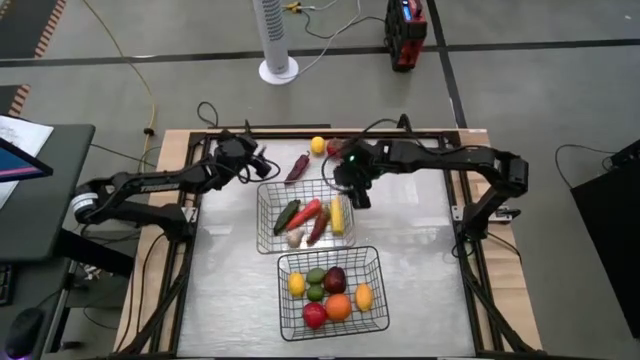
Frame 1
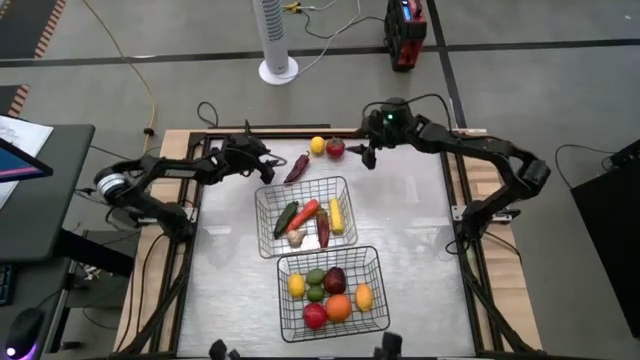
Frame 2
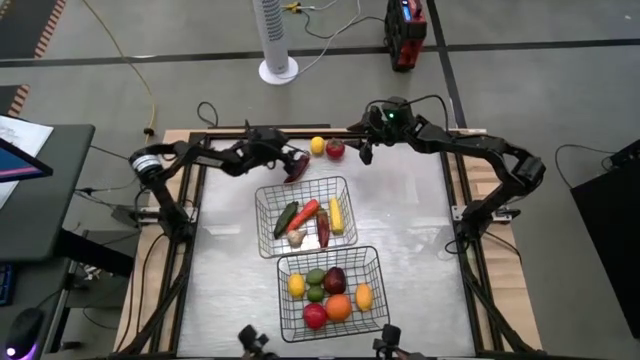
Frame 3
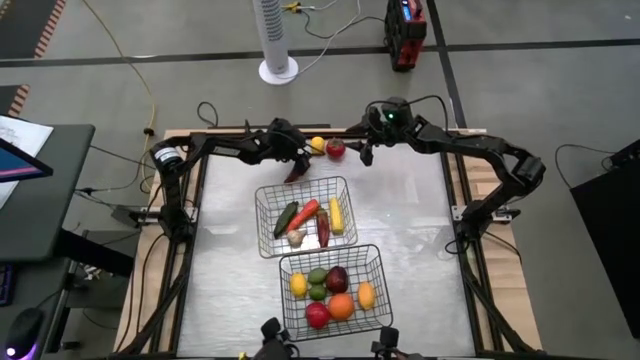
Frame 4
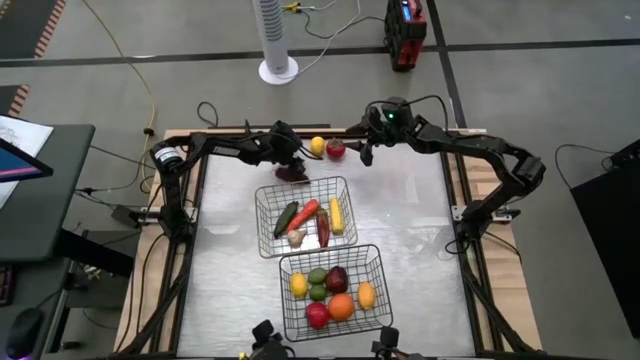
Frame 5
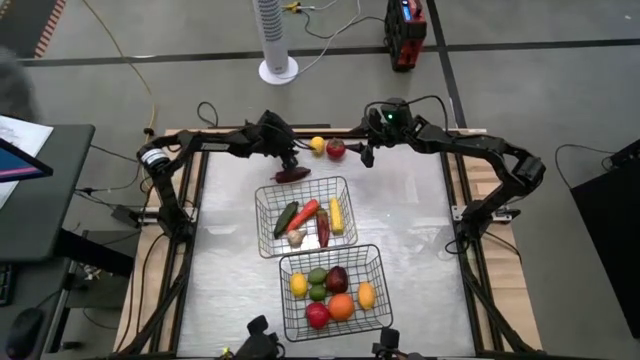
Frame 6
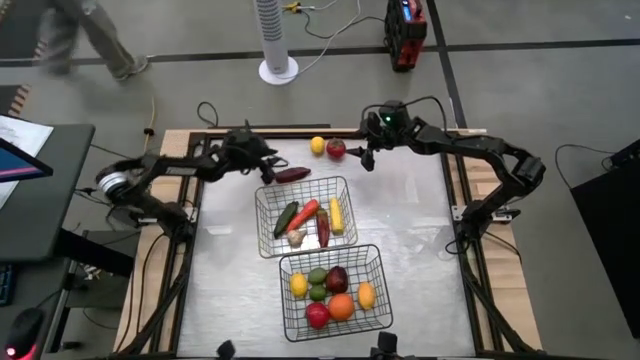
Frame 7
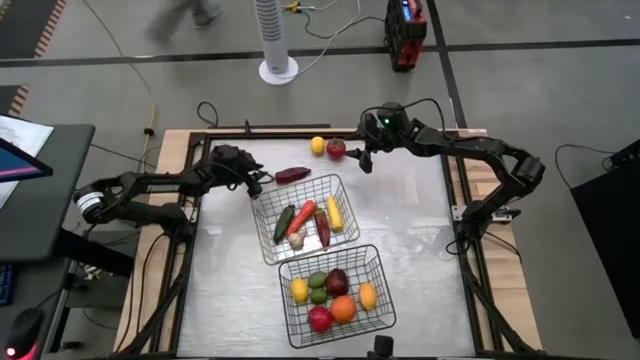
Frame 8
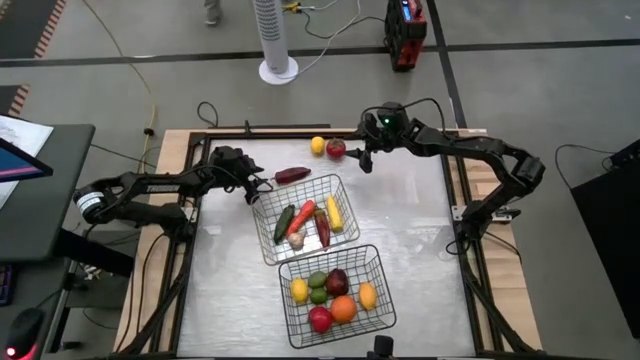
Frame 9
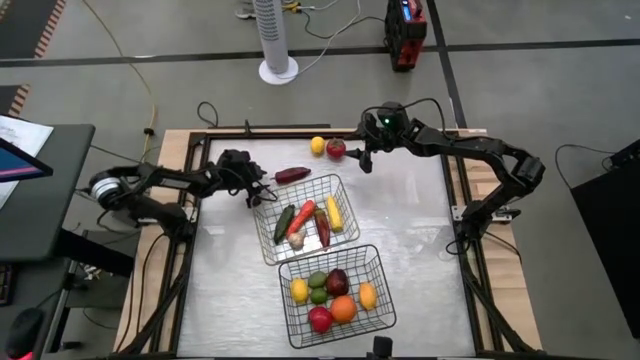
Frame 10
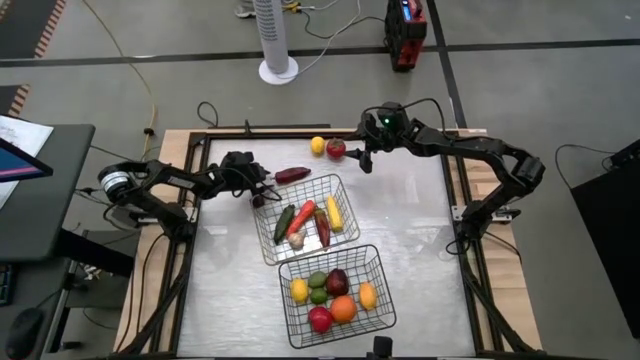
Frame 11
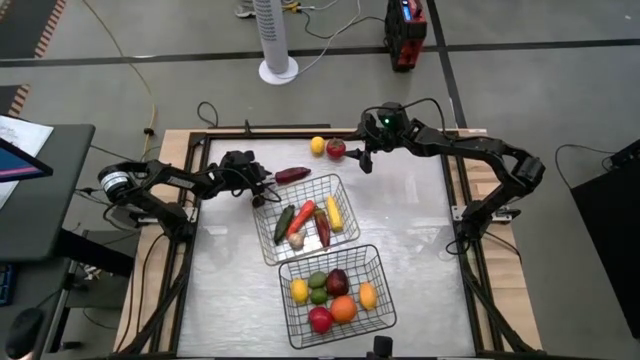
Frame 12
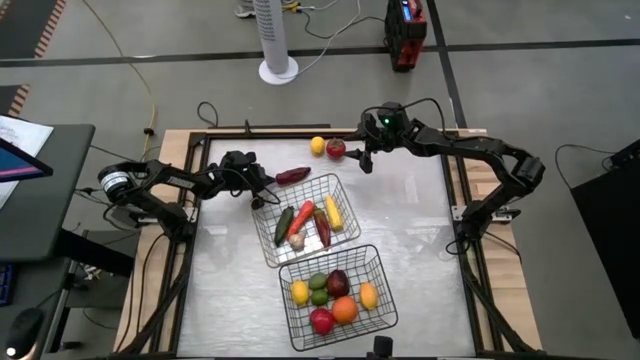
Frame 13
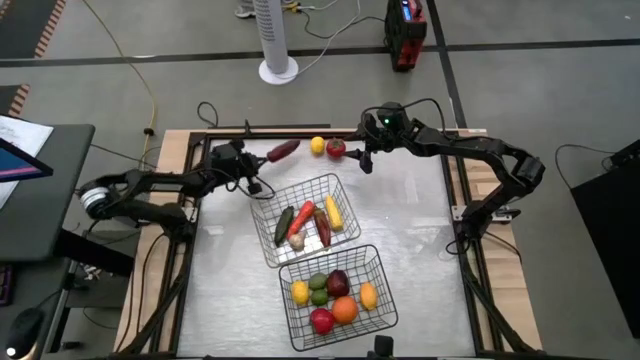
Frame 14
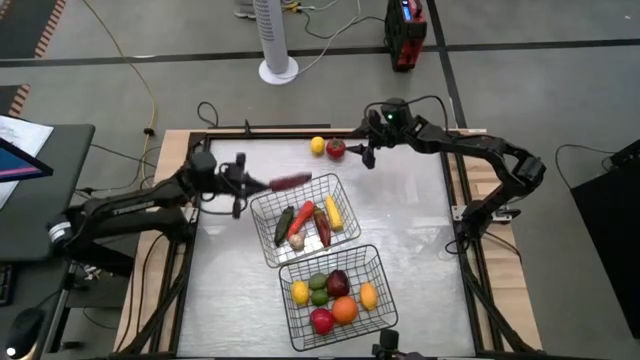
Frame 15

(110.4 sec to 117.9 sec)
Task: Sort produce into baskets
Put the red chili pepper into the top wire basket

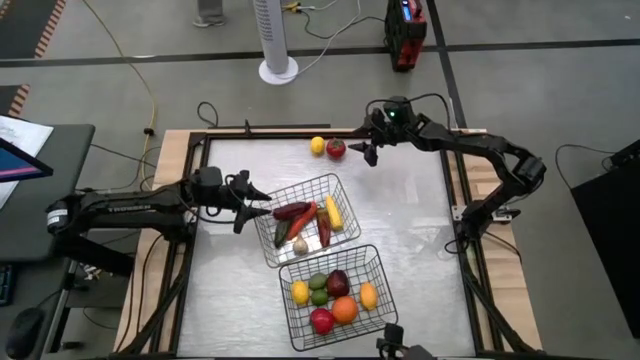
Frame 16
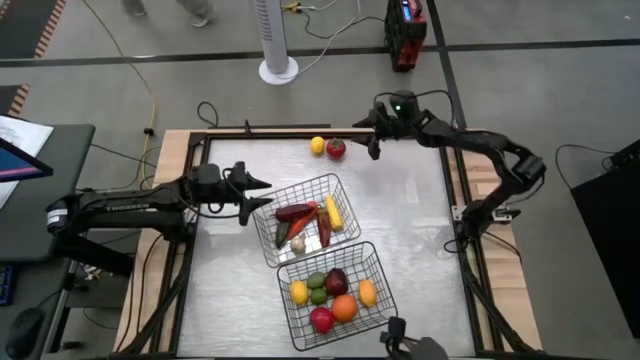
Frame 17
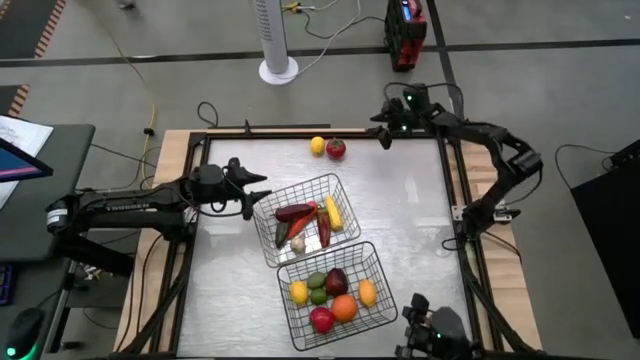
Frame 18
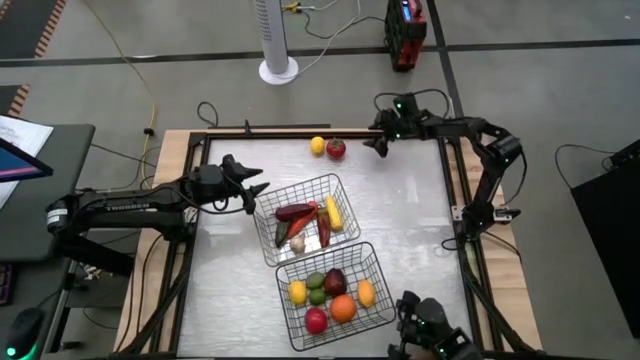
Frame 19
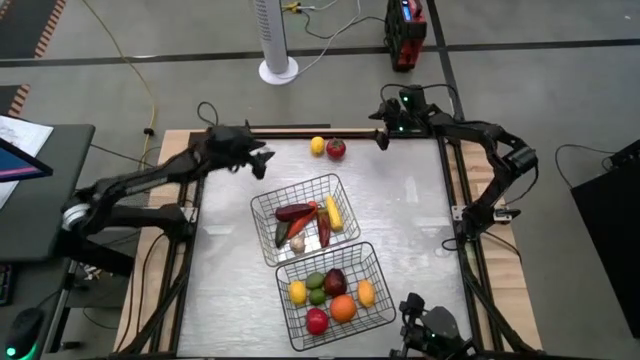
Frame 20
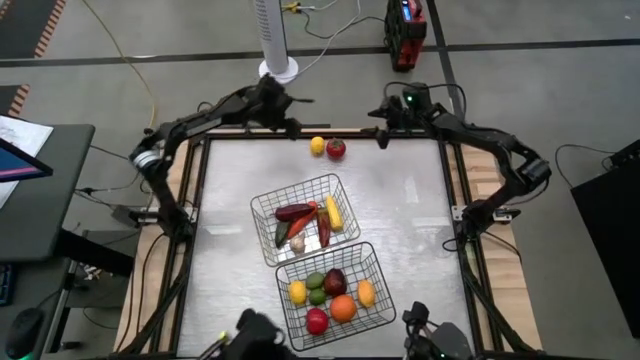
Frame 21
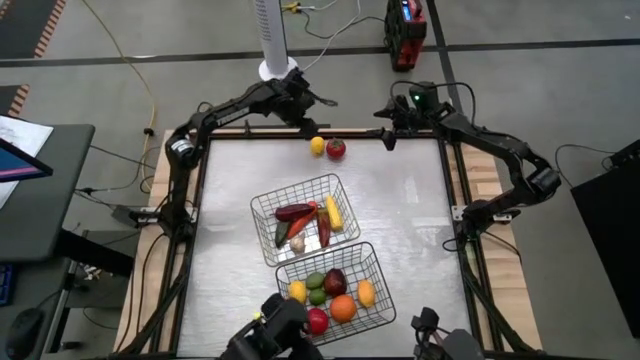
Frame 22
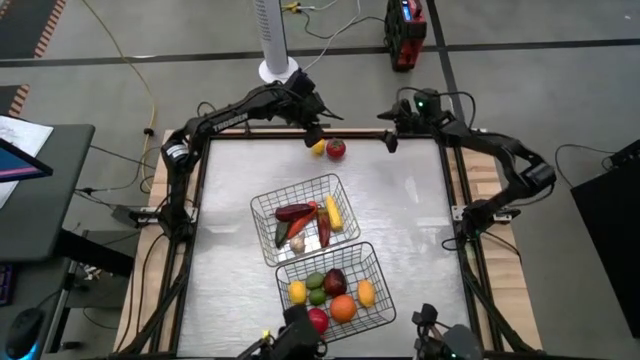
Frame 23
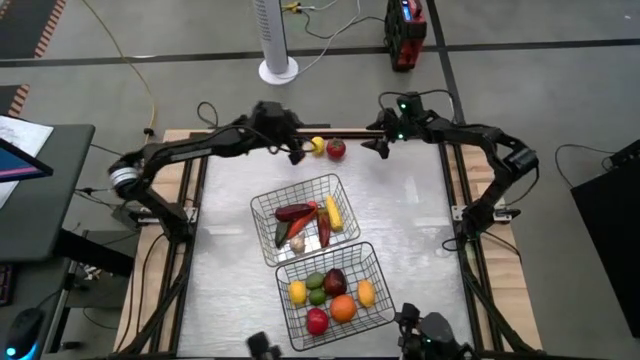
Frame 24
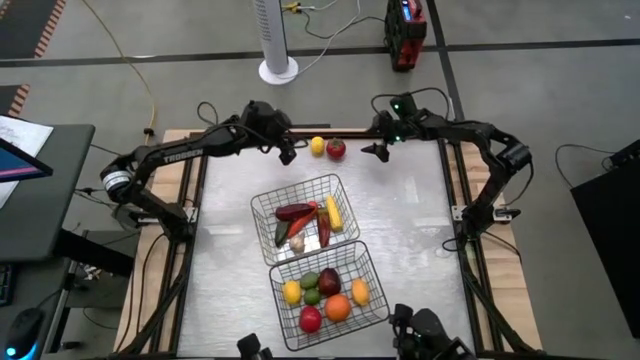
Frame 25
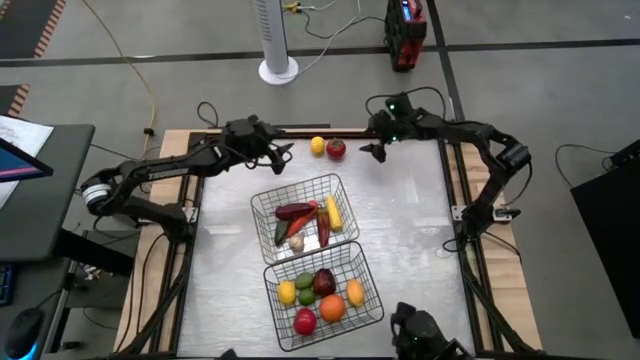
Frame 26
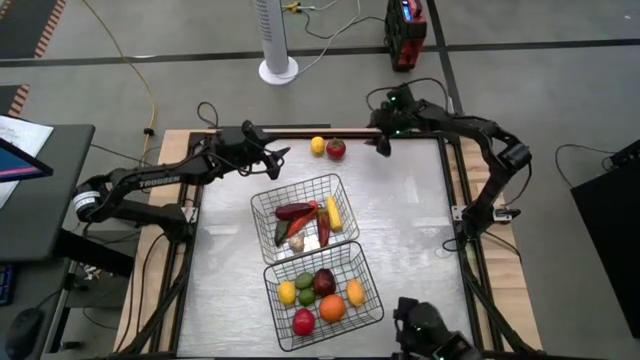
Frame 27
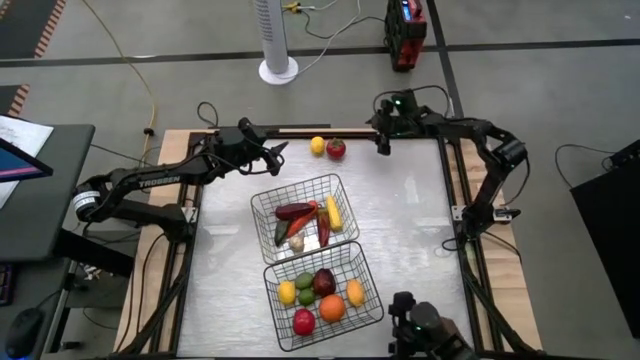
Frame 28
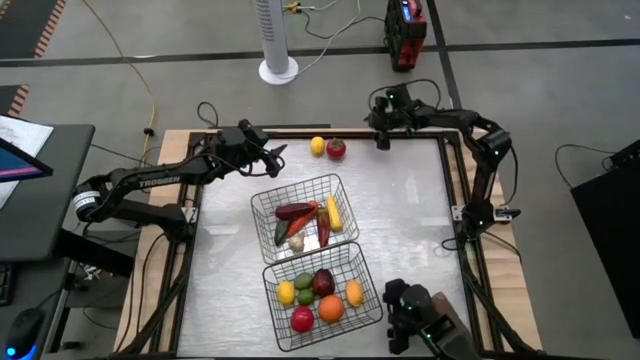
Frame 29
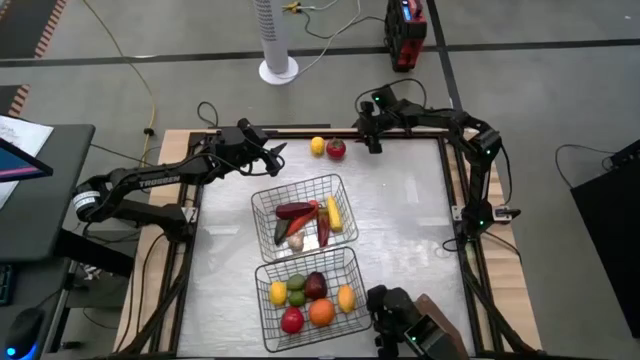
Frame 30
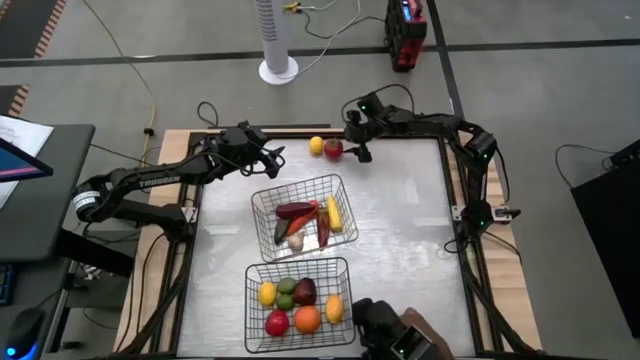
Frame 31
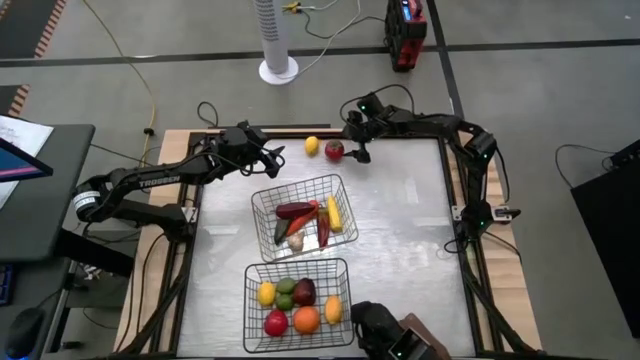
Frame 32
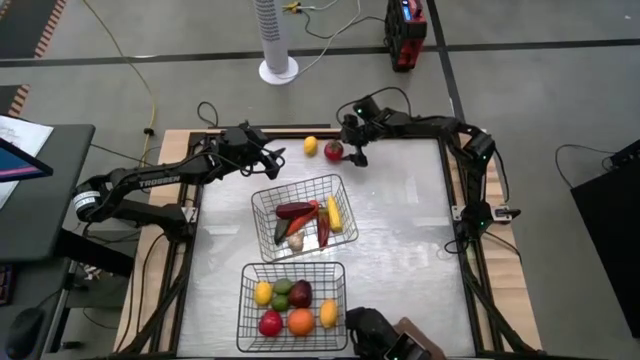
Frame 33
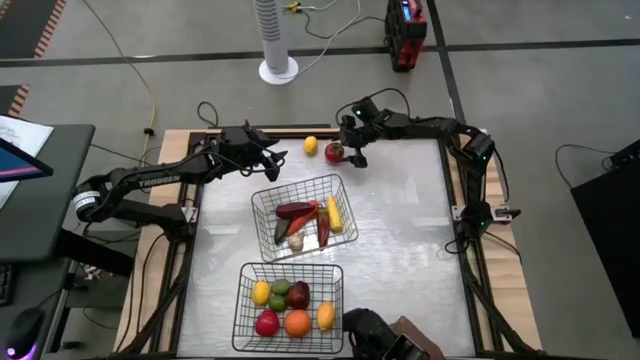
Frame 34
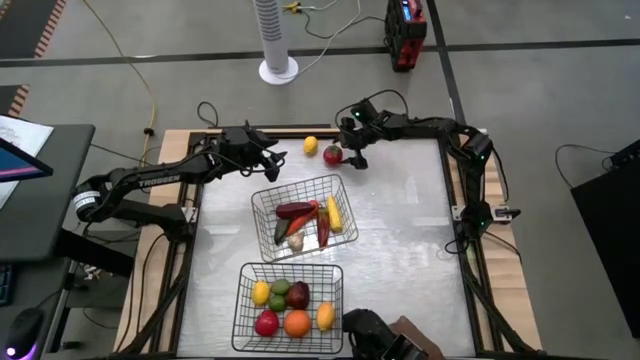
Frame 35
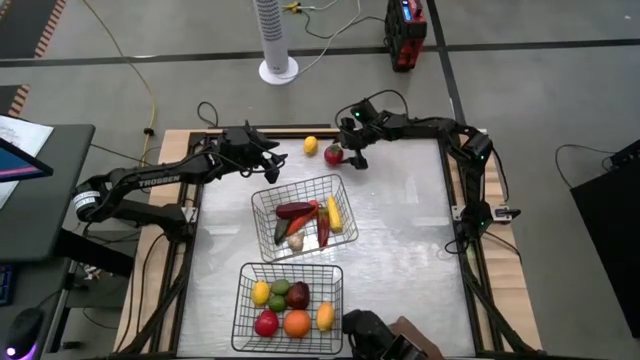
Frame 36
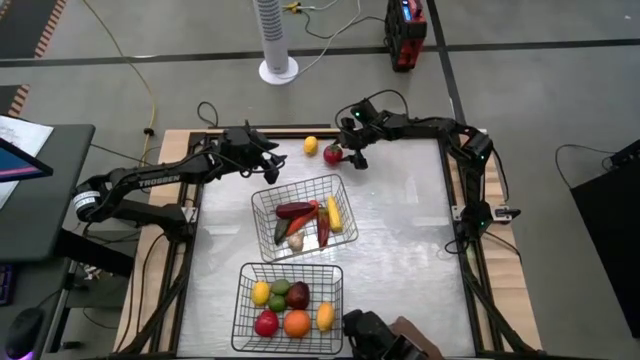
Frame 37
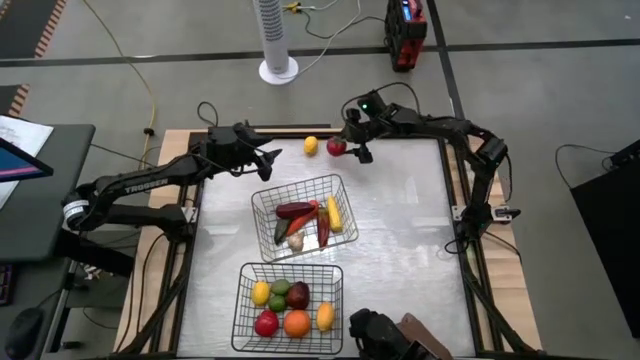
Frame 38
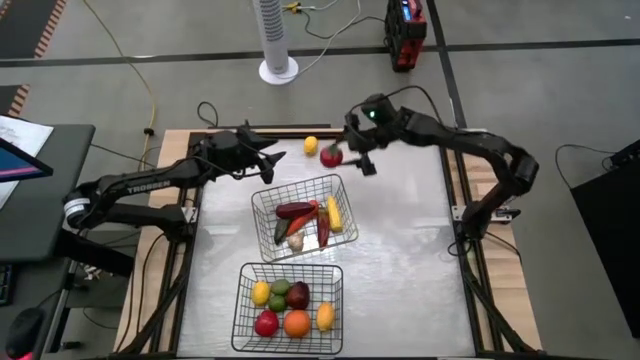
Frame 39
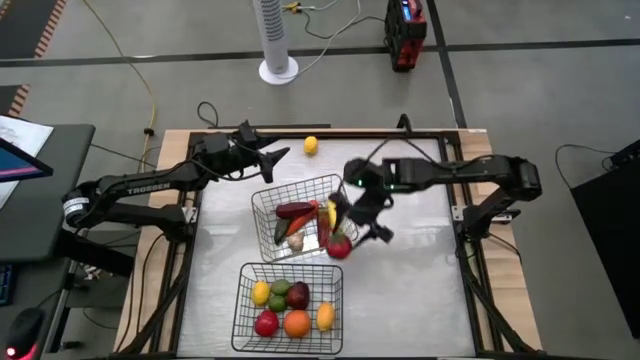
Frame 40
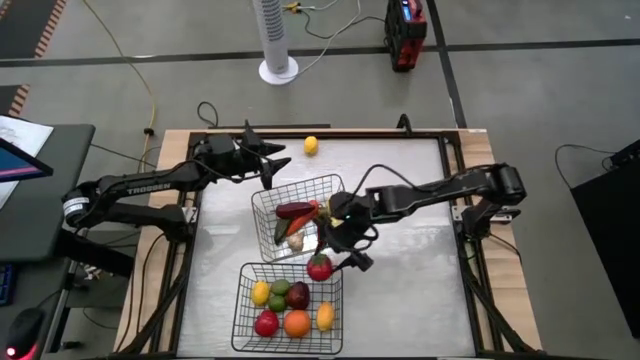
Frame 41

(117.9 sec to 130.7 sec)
Put the tomato into the bottom wire basket

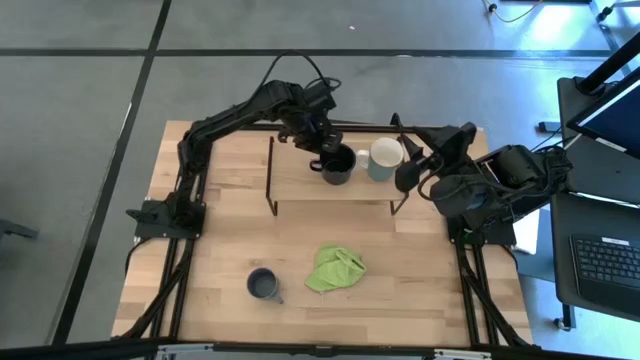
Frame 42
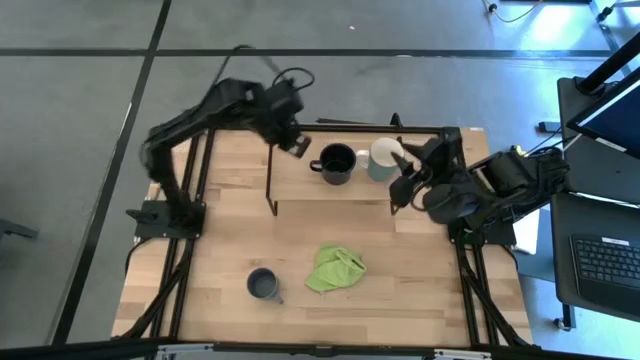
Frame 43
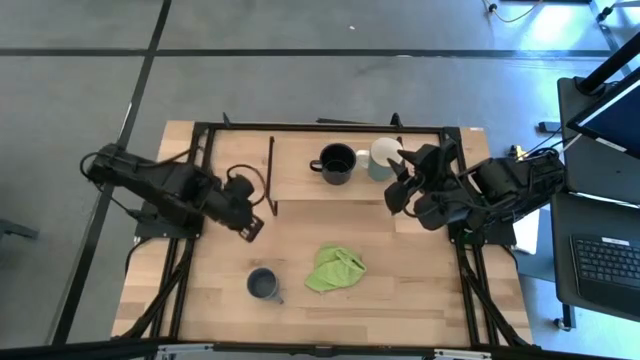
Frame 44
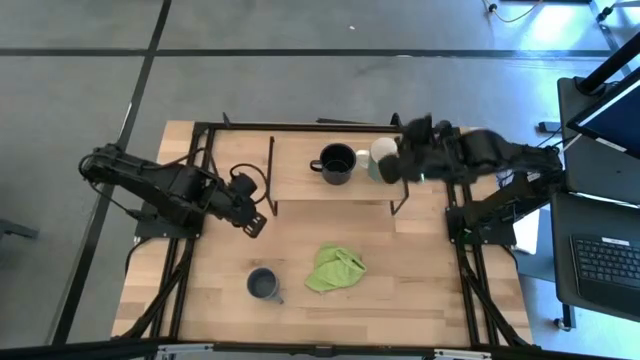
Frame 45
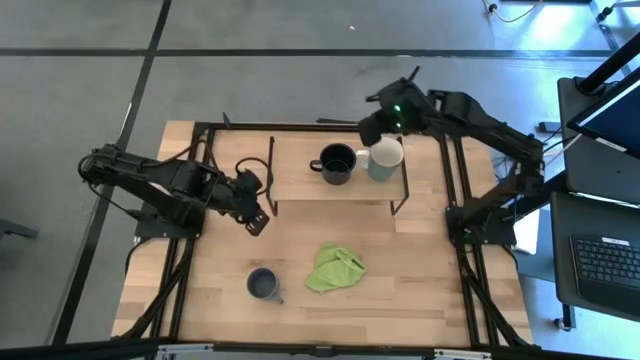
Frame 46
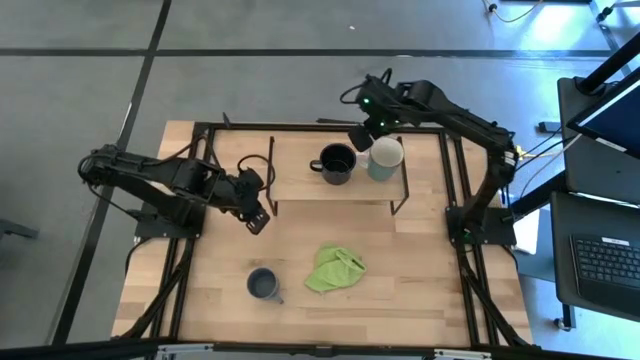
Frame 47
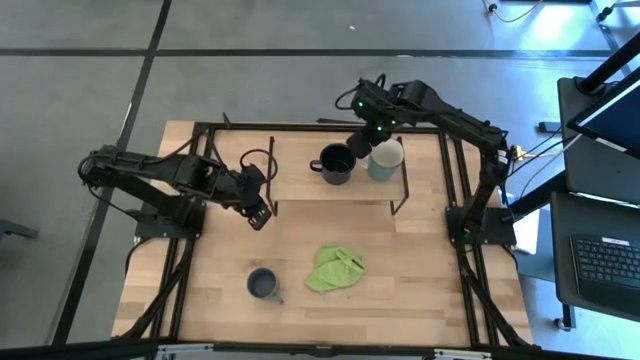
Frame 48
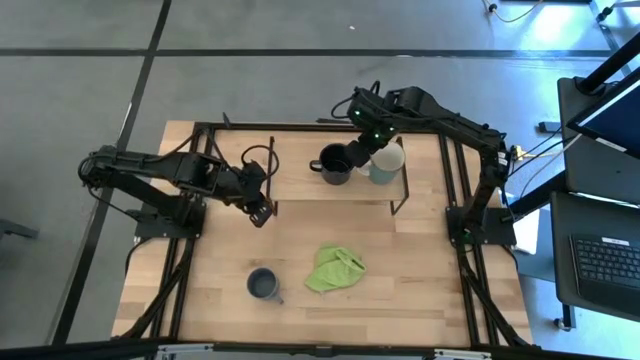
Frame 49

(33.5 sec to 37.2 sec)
Task: Stack small to large cups/mugs on shelf
Adjust the blue mug on the shelf
